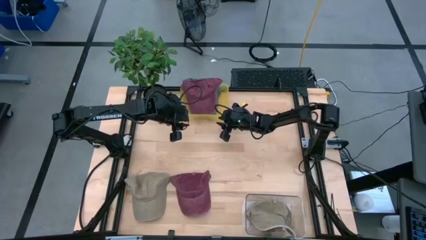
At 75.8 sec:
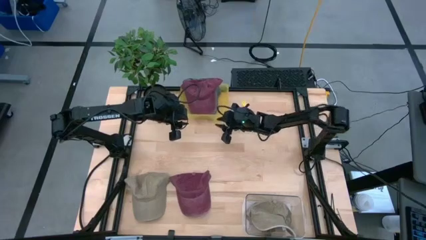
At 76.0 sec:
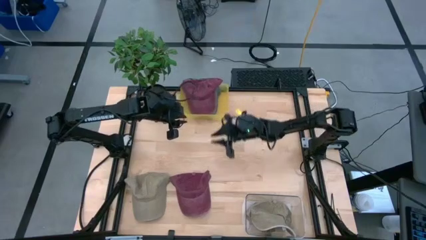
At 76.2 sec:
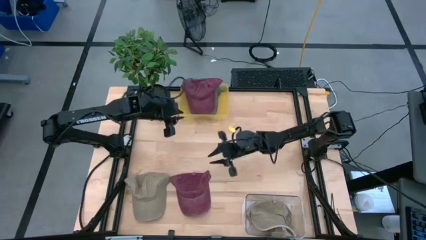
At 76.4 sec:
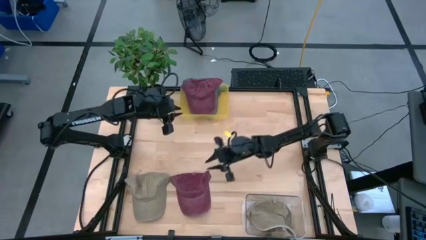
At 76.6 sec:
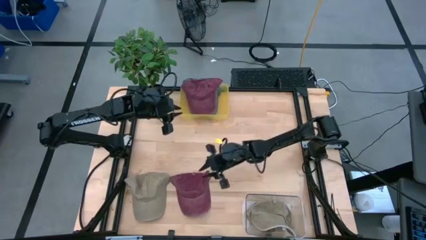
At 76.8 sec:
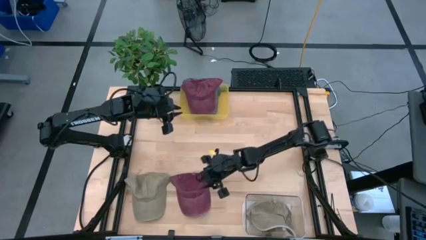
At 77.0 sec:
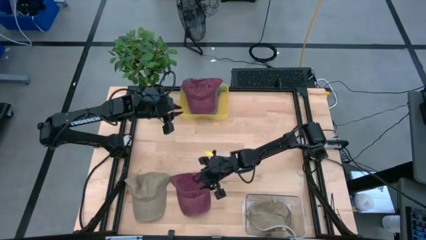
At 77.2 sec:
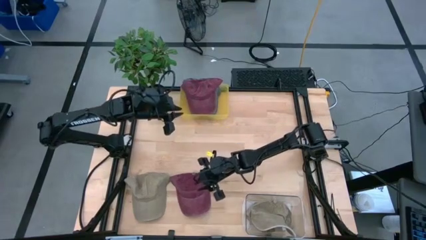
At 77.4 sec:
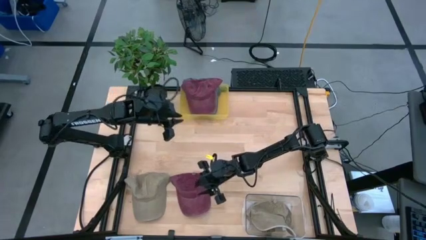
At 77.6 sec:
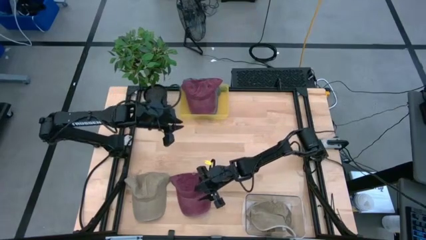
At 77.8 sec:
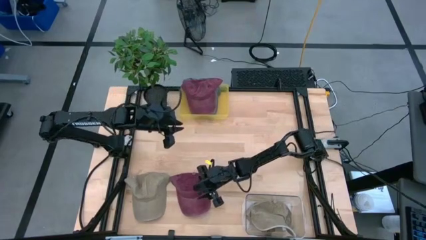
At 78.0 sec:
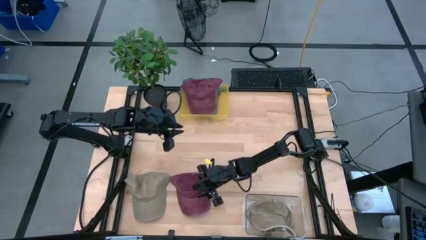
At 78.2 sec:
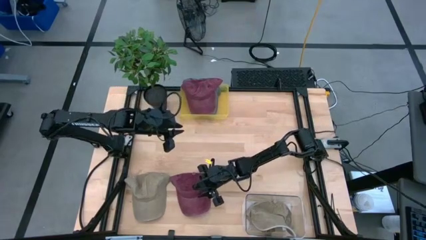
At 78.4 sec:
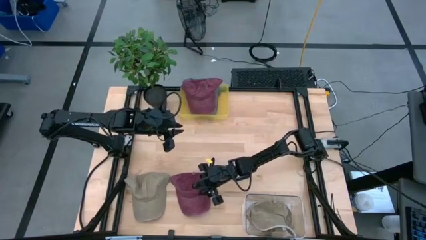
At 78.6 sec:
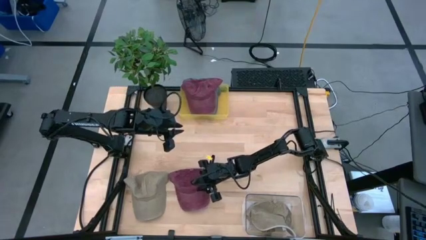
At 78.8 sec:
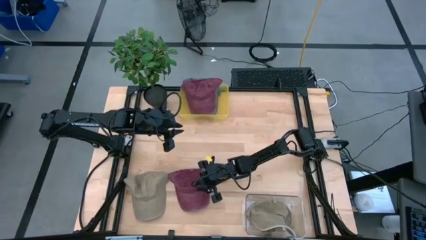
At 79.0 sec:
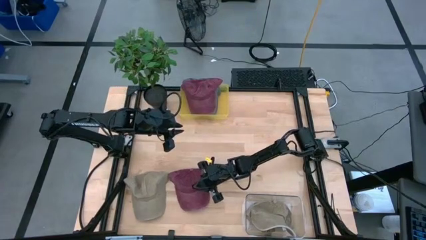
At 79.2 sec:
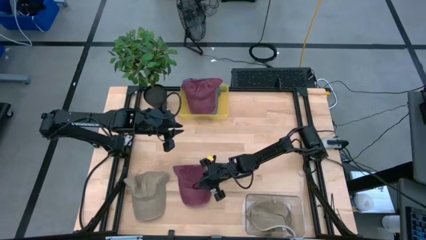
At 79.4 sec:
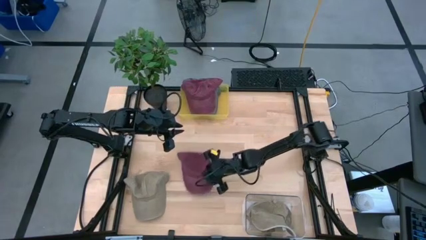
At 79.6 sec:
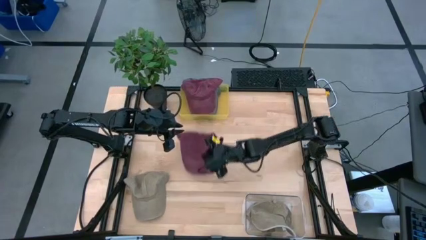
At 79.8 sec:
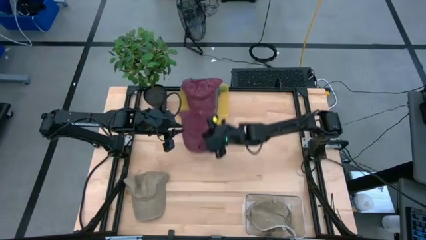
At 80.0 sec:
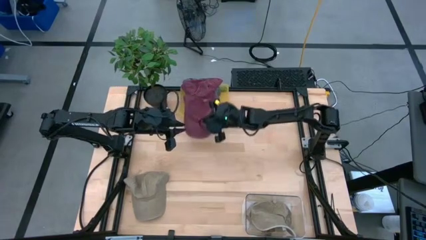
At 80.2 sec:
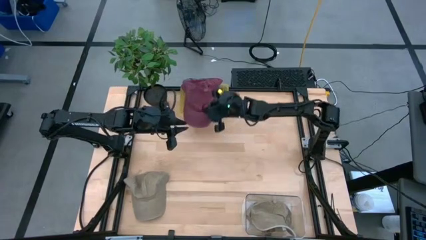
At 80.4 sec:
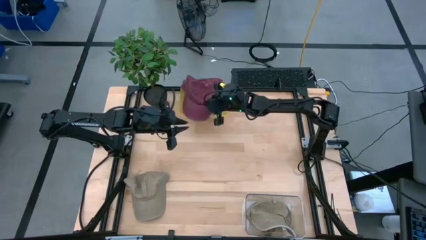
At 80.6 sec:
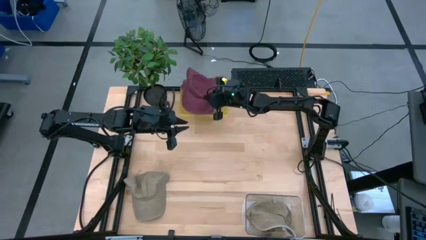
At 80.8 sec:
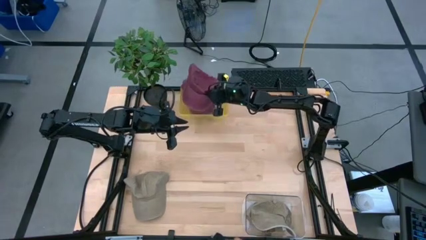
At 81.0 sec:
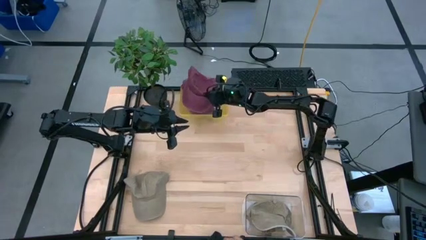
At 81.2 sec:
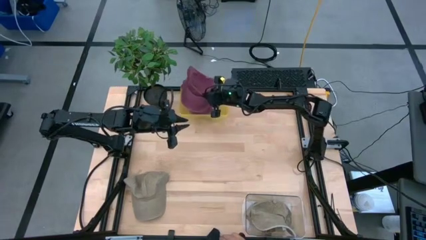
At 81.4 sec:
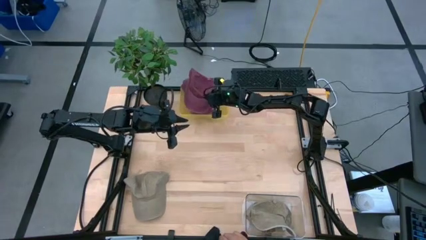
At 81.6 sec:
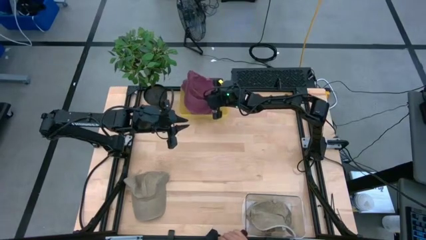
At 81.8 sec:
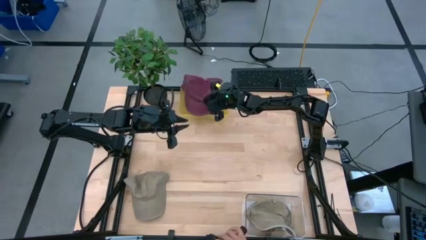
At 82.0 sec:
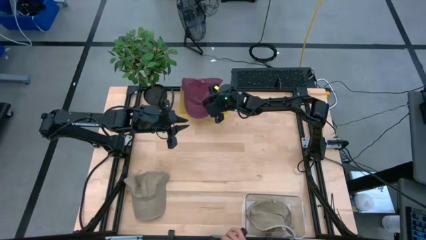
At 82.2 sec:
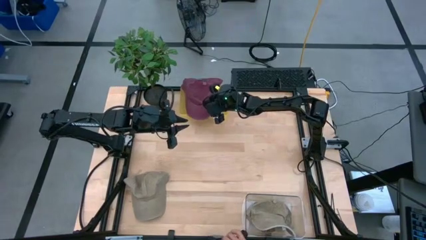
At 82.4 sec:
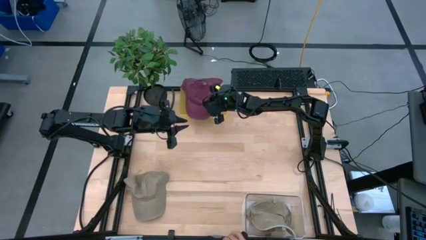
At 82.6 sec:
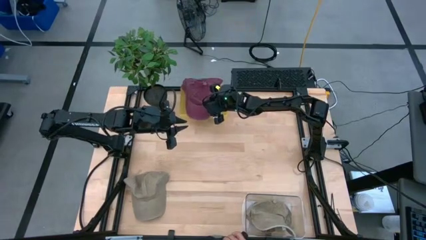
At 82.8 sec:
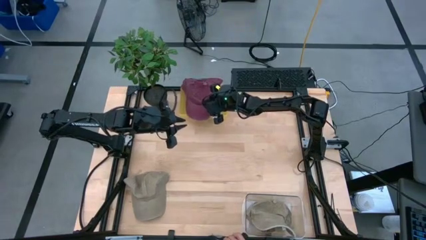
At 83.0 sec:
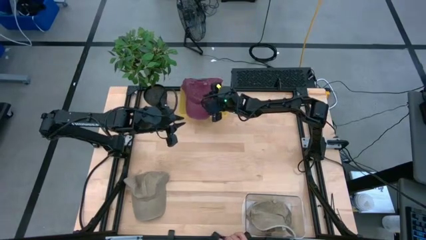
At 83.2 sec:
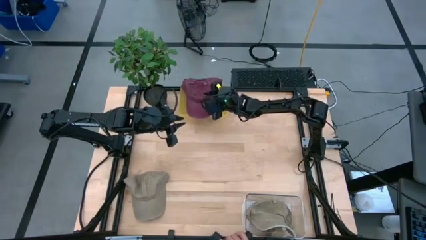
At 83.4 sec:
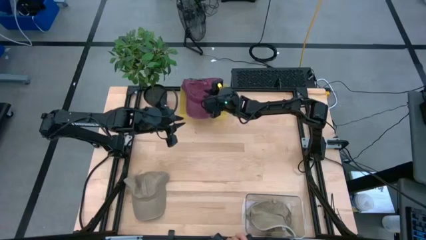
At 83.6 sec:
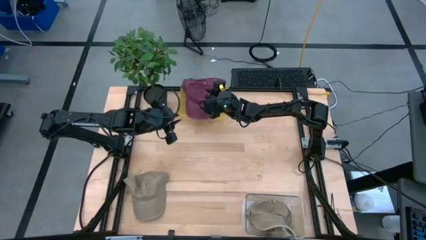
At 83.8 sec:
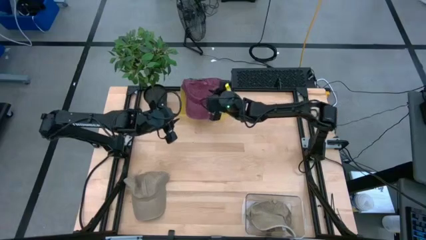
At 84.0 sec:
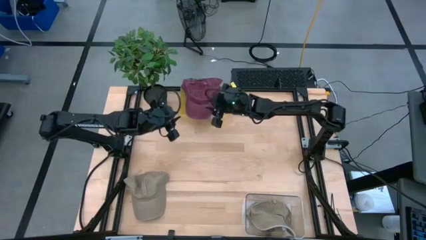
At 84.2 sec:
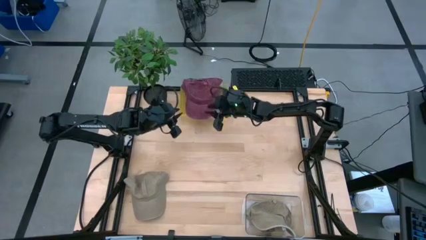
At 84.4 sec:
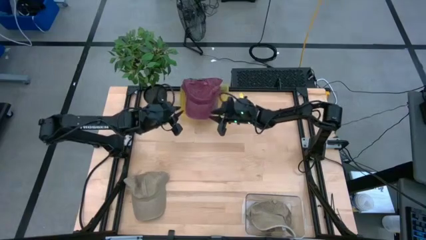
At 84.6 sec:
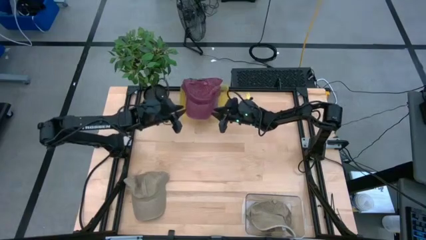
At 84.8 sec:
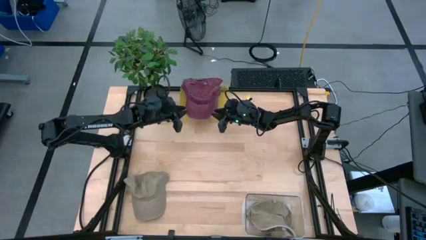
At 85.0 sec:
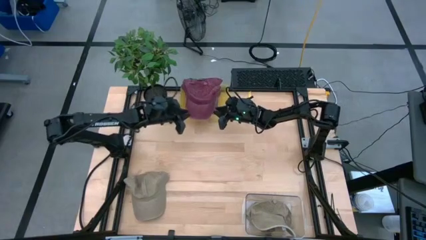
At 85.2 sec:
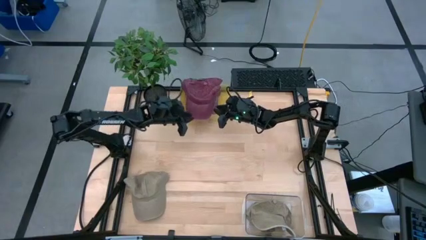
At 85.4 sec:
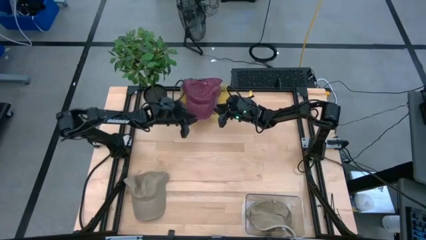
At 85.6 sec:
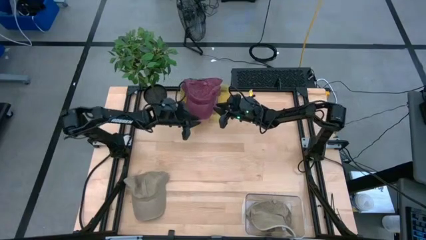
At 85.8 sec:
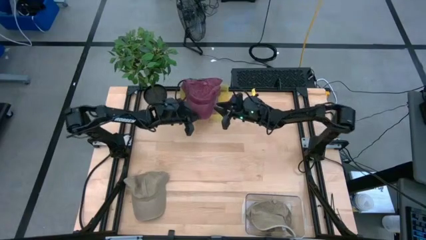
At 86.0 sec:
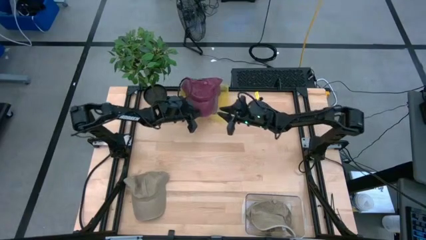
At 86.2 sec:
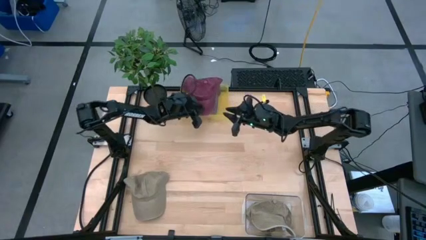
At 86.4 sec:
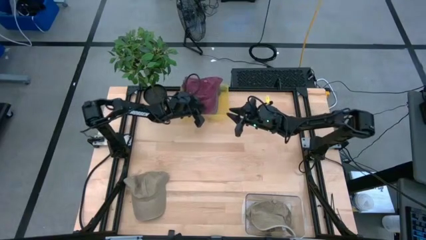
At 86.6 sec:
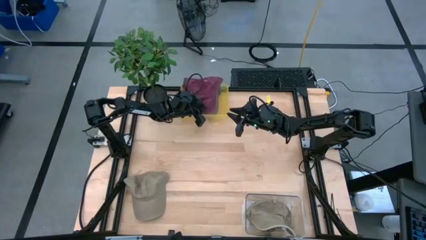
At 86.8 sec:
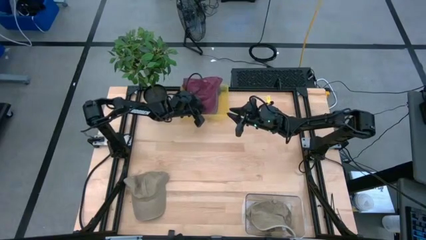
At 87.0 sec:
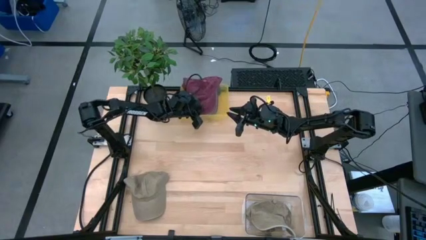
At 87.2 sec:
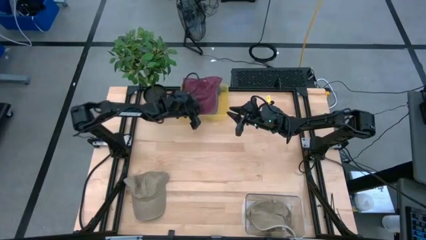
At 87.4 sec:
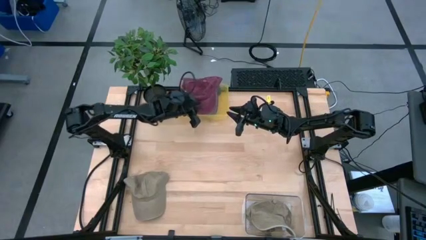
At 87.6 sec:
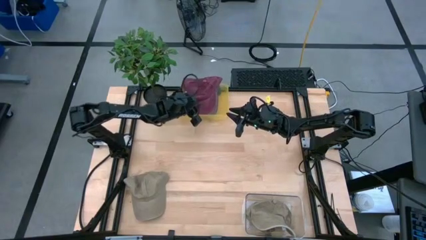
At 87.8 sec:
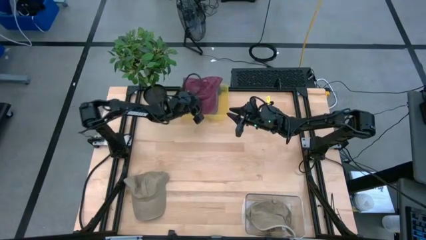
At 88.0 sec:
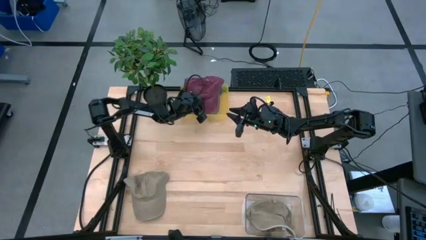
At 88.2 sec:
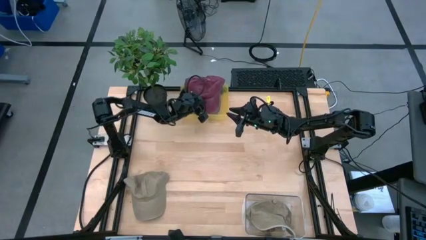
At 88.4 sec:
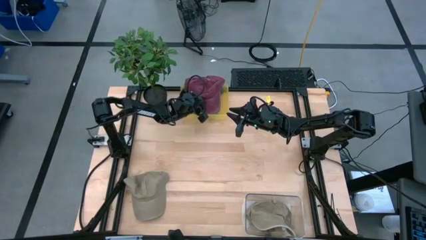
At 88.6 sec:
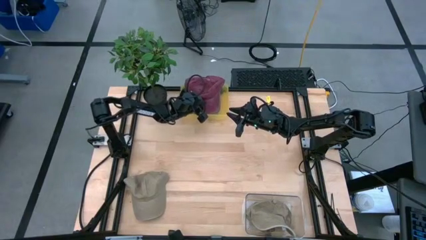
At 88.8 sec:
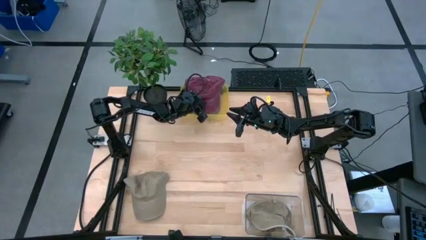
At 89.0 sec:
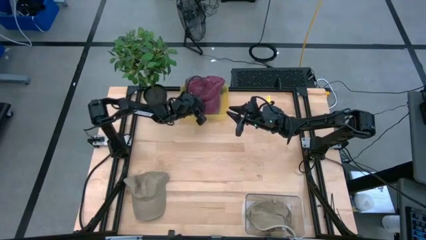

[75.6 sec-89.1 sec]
Task: Pick & Place hat
Put the red cap into the yellow bin
